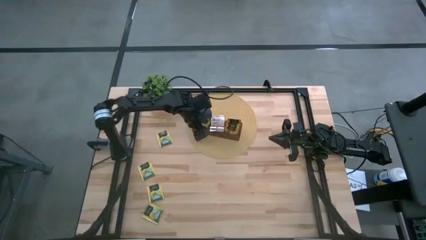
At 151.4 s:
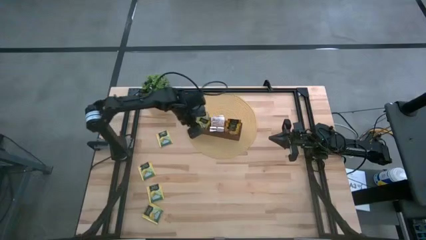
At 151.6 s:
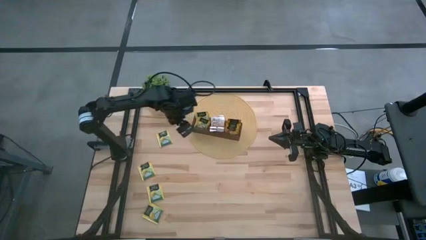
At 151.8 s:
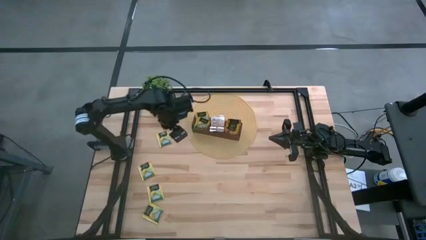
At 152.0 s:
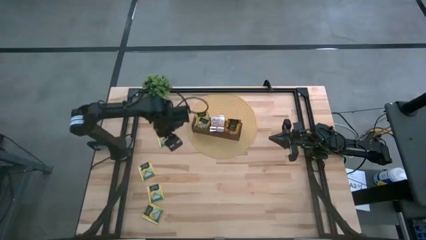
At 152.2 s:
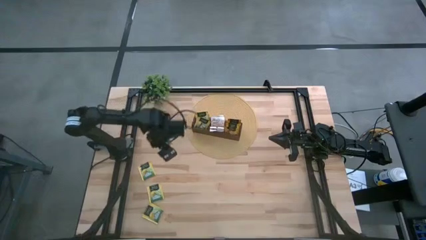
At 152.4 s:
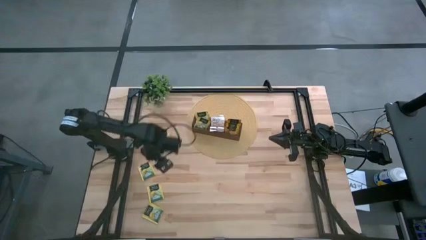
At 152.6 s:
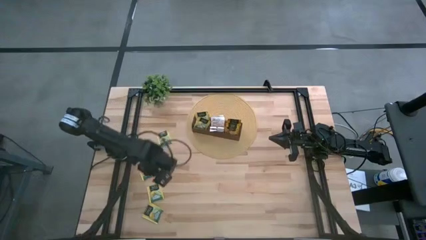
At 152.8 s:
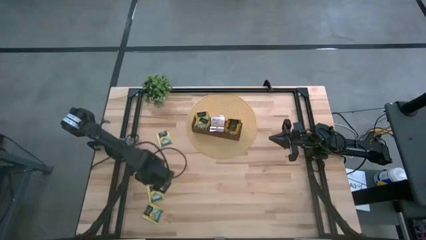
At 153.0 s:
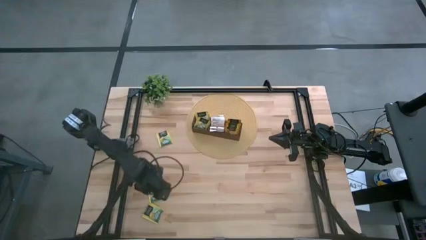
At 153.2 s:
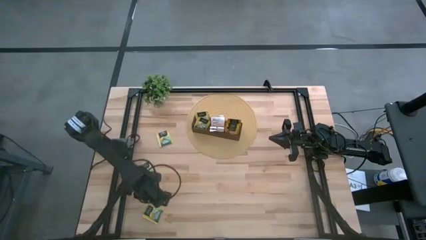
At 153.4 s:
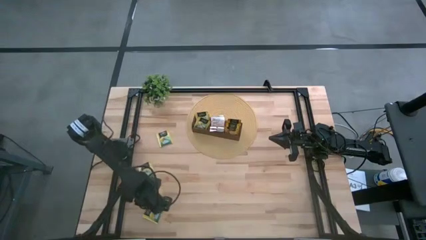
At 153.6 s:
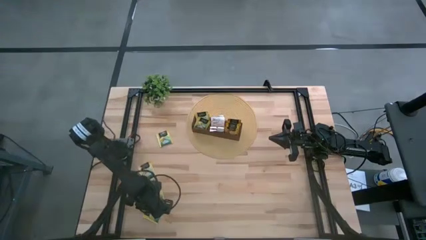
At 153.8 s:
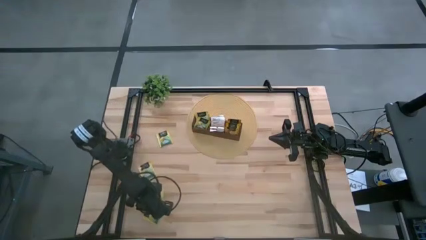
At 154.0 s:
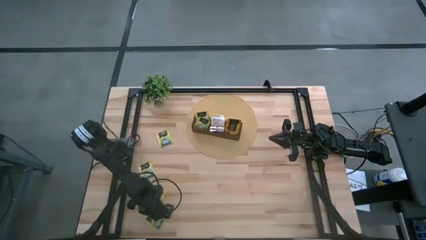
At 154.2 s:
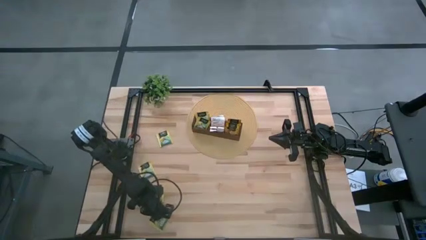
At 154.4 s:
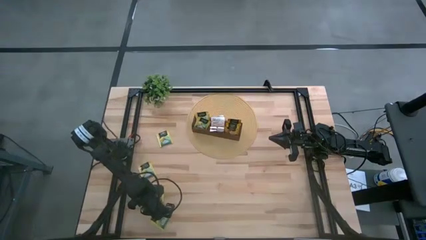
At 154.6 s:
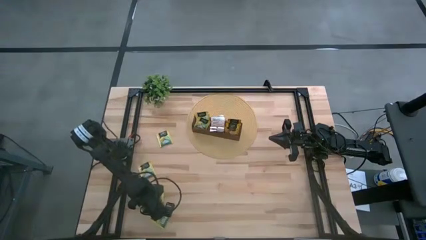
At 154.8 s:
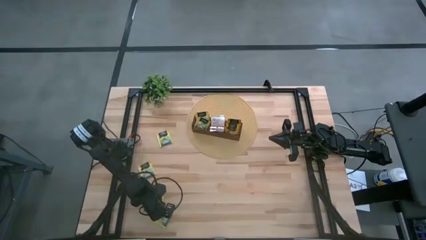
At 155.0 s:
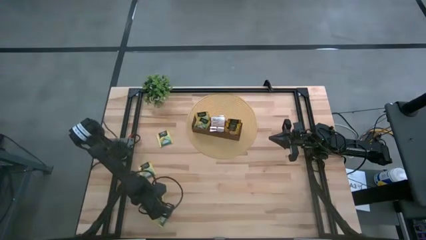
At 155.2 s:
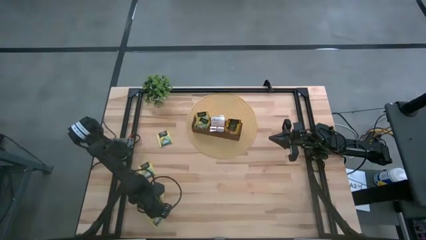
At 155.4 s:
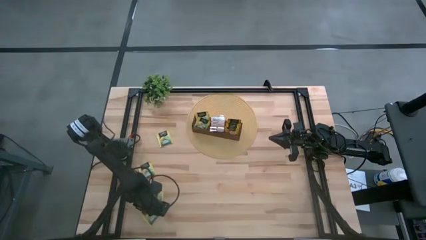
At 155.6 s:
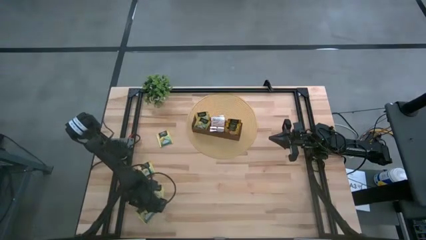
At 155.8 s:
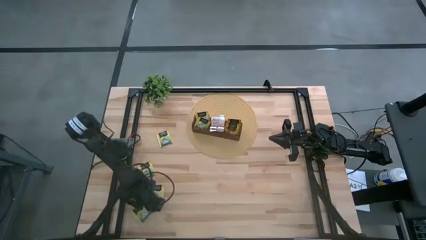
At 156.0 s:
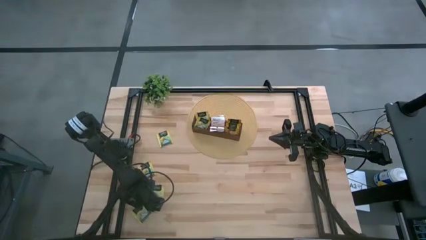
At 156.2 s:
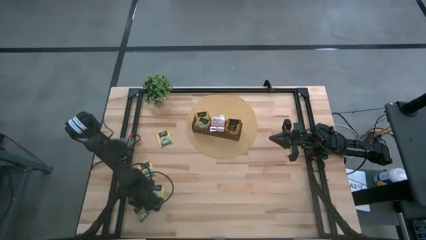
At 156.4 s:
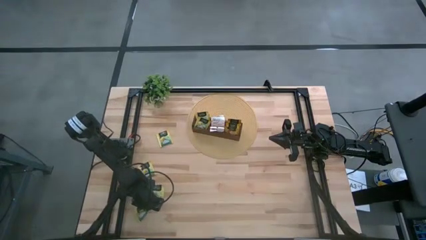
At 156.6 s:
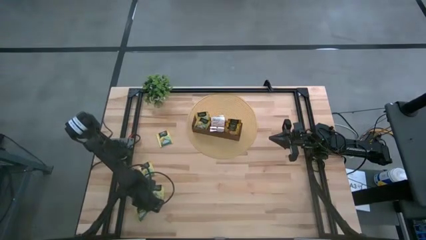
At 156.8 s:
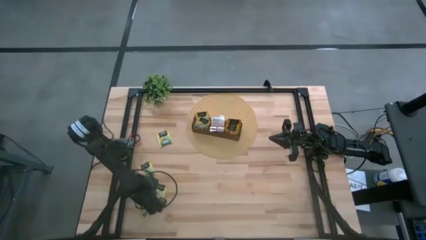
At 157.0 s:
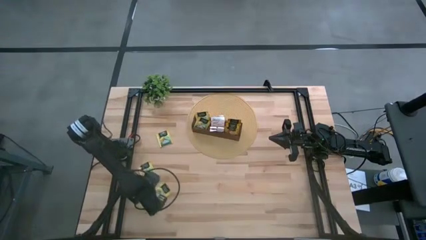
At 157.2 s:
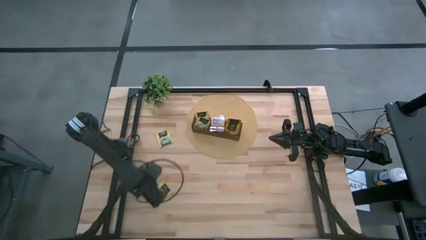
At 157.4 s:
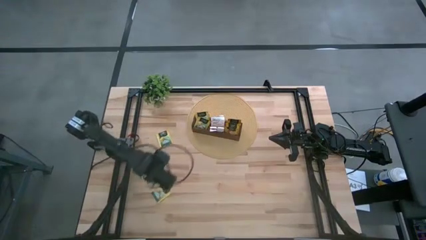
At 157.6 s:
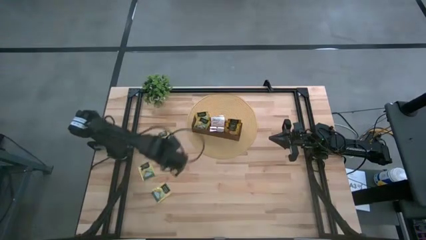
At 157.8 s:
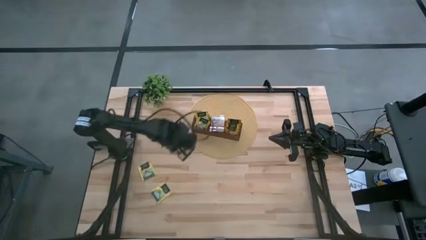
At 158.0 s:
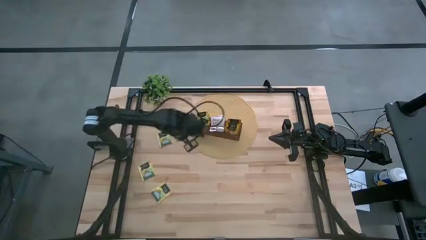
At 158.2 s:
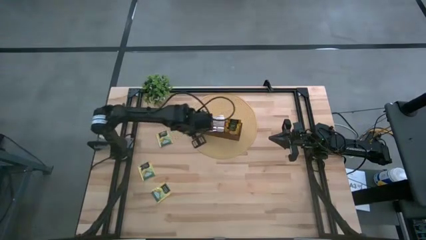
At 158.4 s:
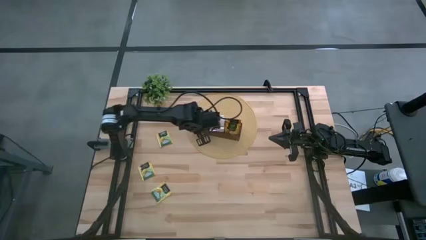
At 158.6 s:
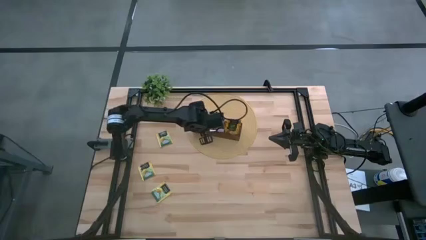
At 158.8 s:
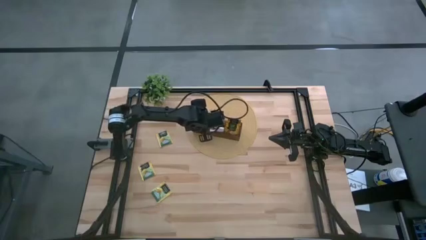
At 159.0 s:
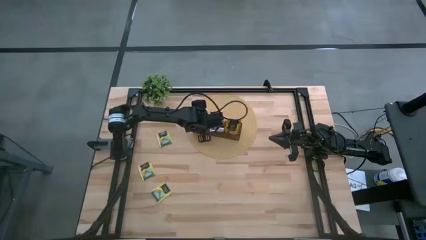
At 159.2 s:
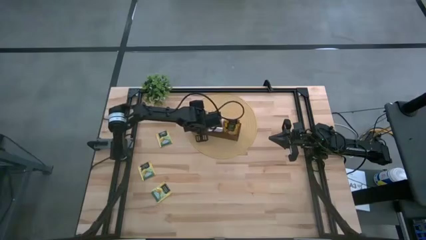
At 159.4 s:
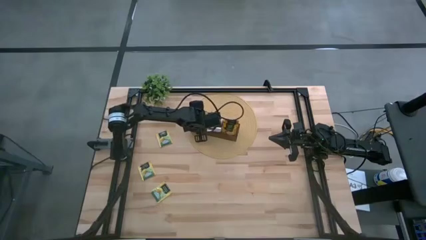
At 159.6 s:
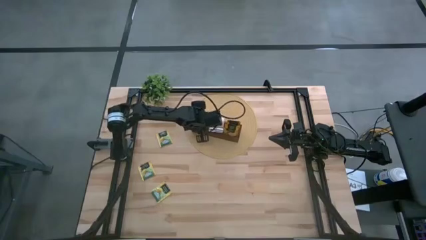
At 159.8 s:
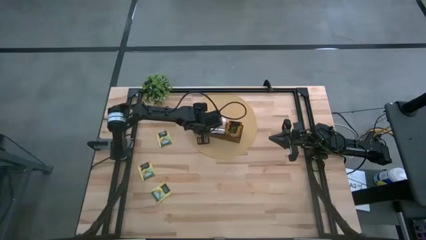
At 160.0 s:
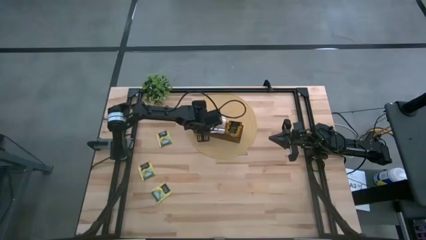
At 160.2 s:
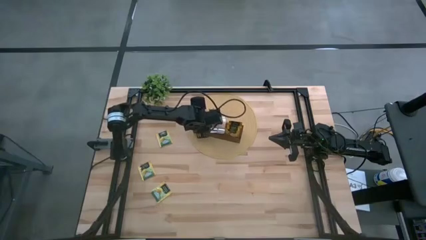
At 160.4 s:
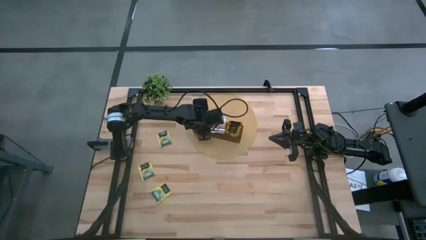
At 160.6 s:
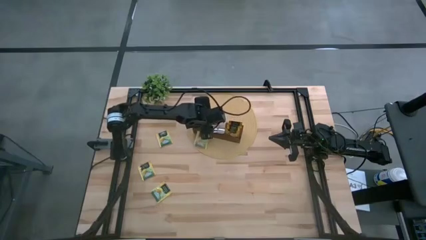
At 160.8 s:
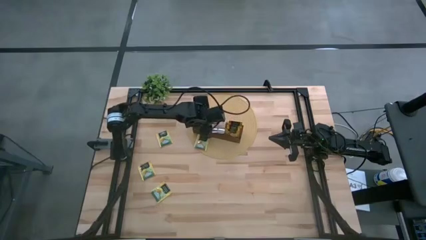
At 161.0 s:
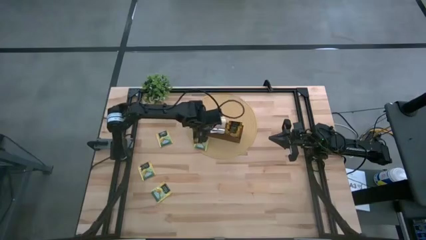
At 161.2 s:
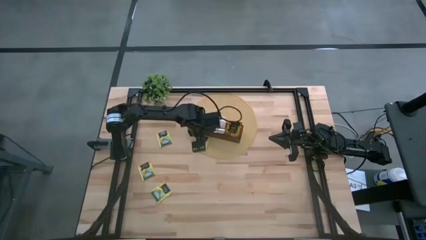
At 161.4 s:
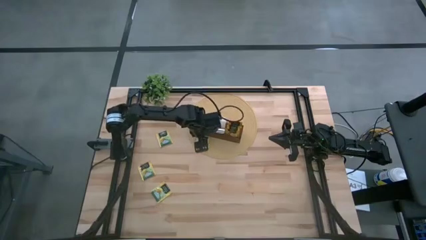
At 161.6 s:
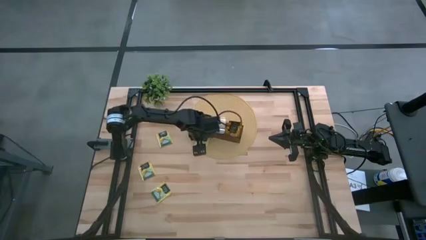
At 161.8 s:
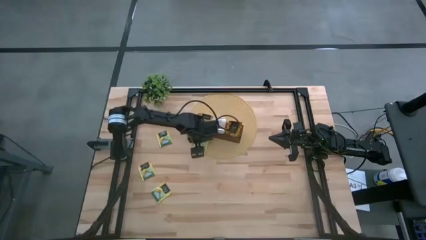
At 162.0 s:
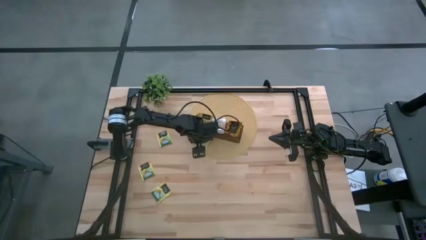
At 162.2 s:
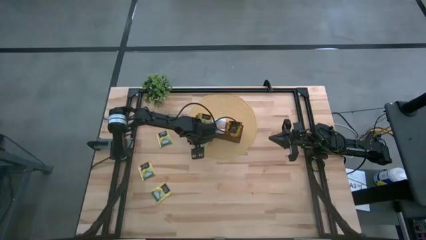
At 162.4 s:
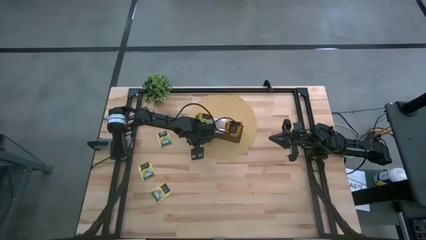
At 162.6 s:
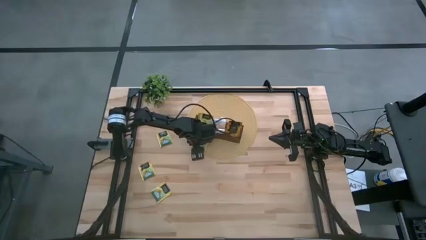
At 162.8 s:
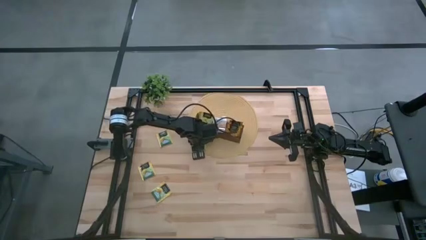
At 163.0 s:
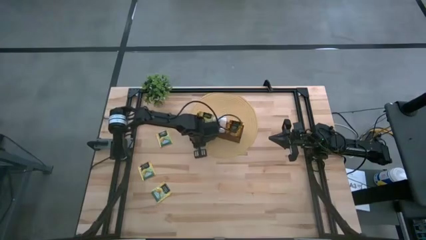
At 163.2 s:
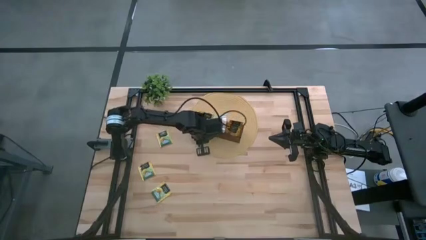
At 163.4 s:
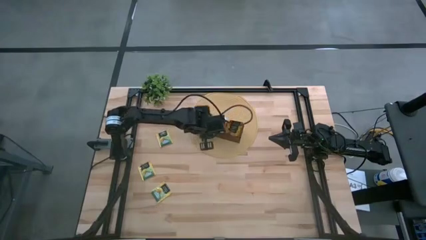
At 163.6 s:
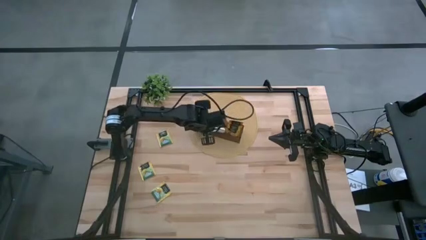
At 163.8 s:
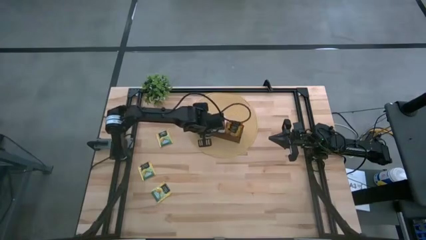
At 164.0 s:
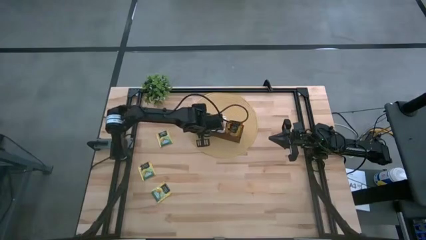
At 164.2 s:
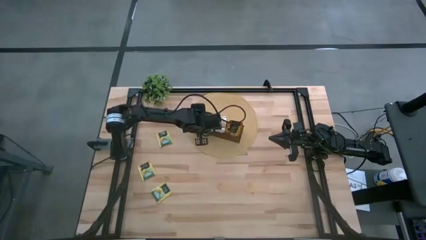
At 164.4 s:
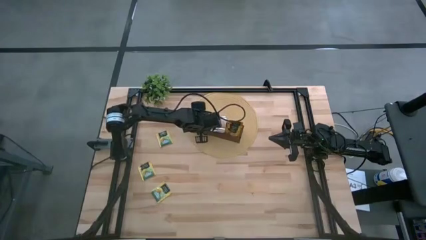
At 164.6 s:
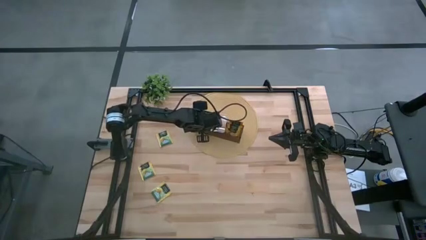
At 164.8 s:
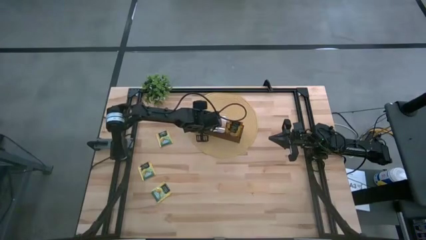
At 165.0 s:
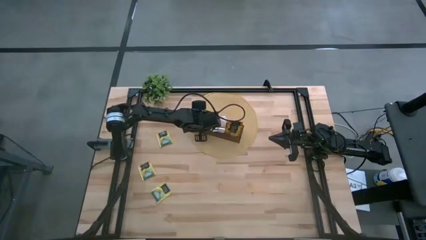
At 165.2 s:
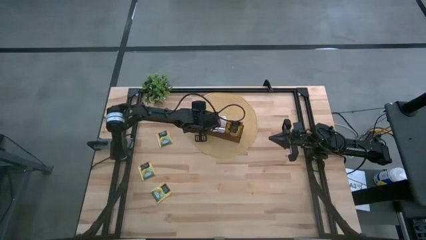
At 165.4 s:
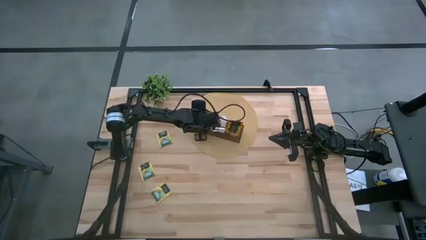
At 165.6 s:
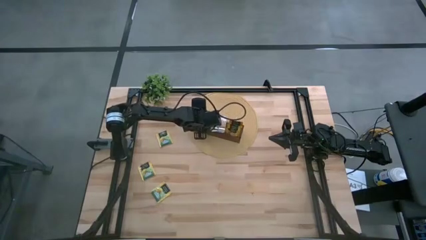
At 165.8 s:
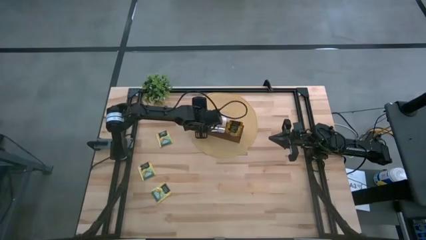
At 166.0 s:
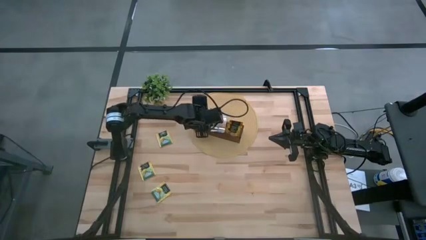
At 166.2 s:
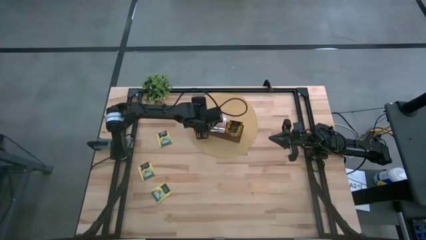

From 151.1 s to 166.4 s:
Task: Pick & Place Tea
Put the yellow tea bag into the left section of the wooden organizer
